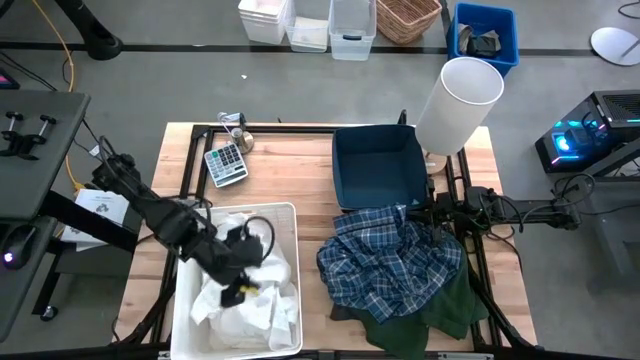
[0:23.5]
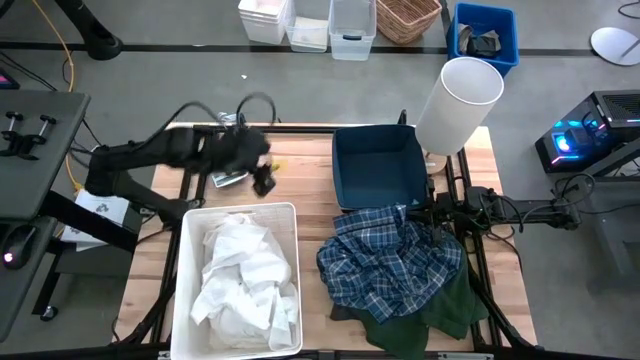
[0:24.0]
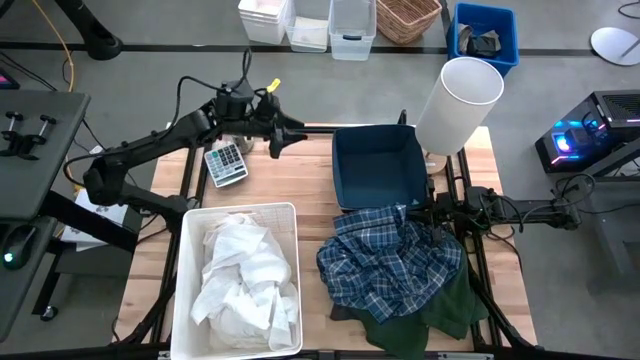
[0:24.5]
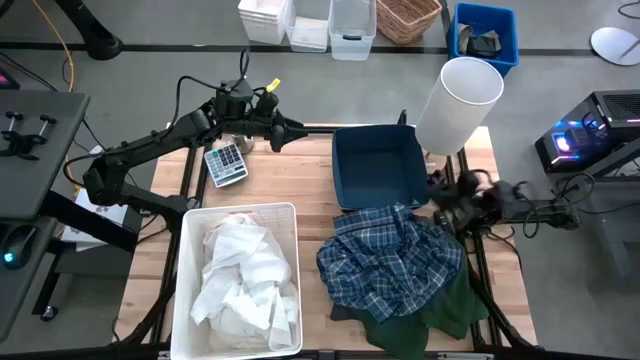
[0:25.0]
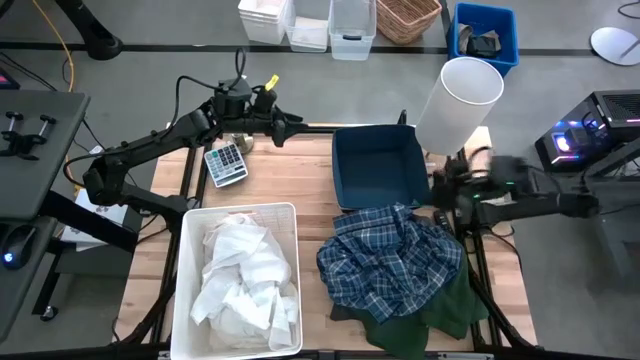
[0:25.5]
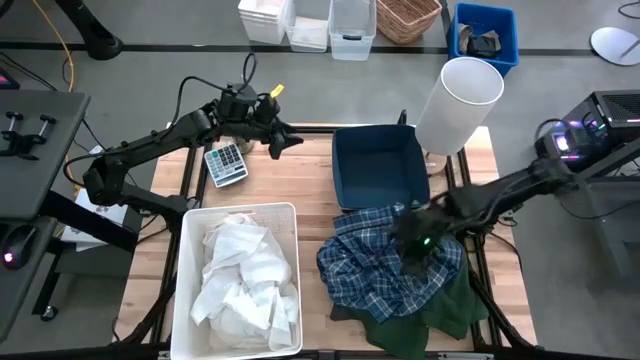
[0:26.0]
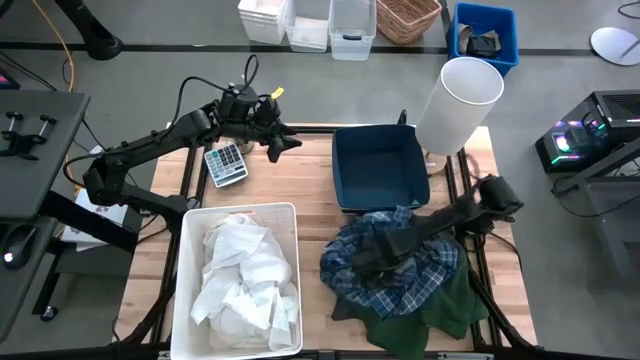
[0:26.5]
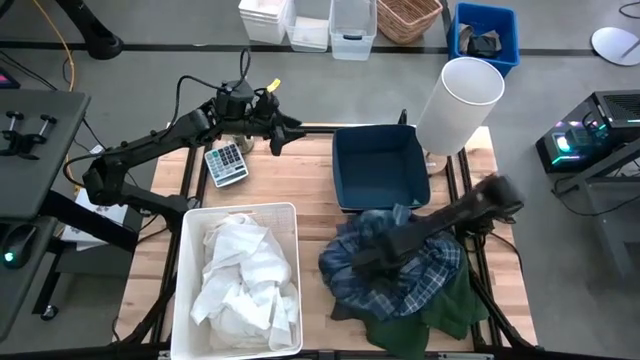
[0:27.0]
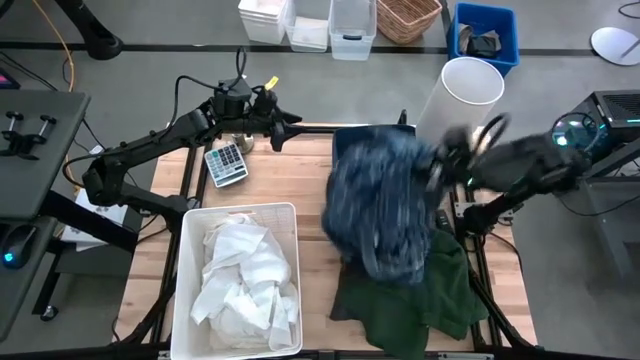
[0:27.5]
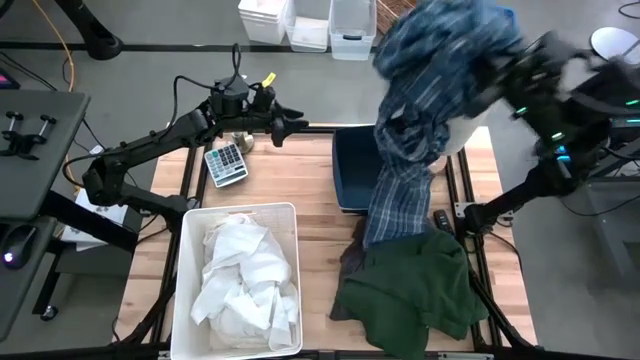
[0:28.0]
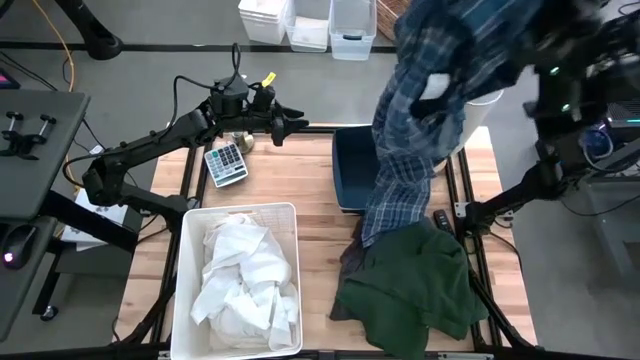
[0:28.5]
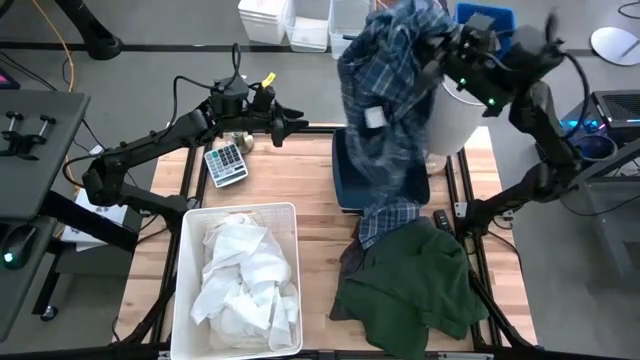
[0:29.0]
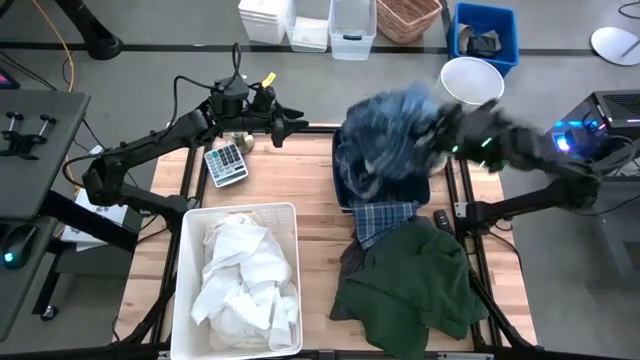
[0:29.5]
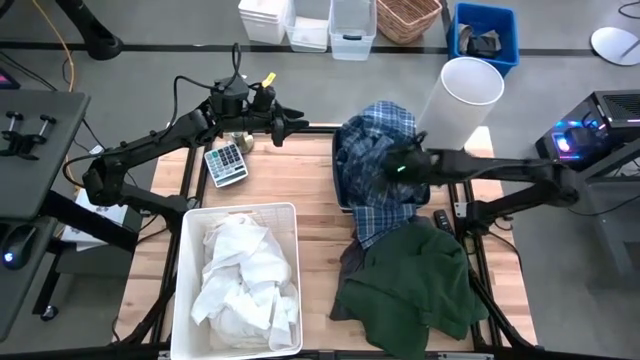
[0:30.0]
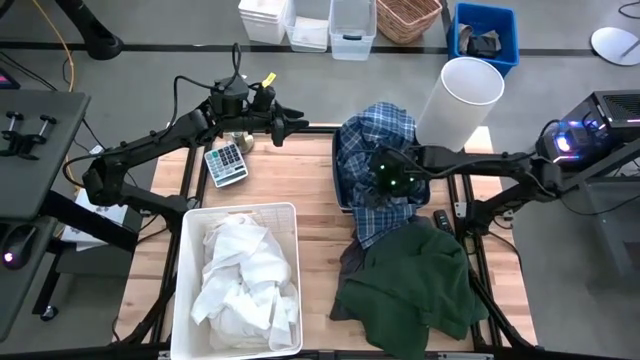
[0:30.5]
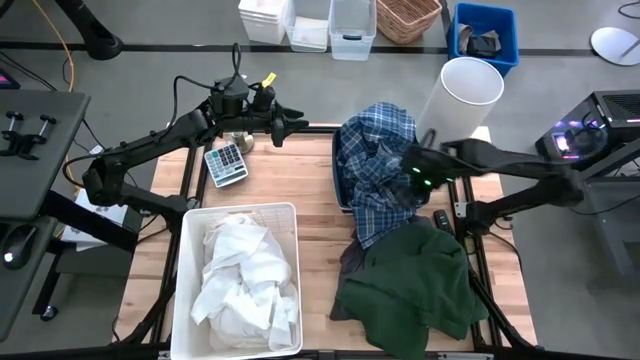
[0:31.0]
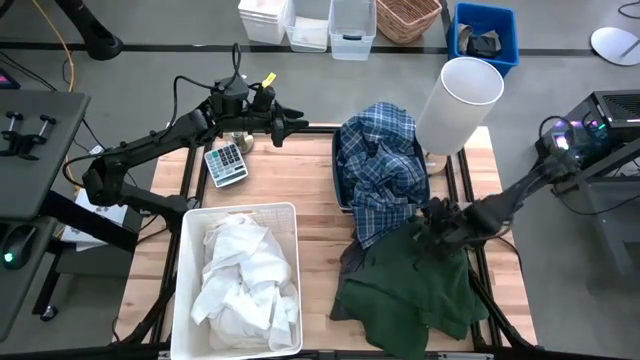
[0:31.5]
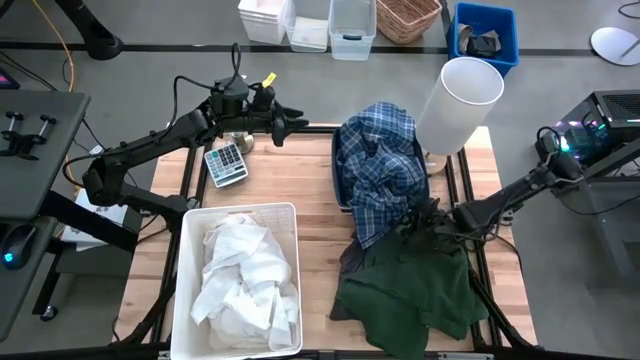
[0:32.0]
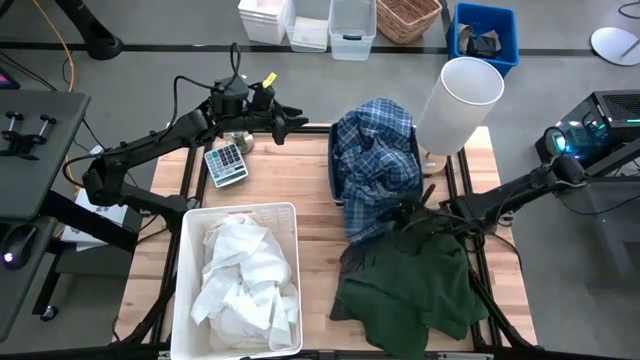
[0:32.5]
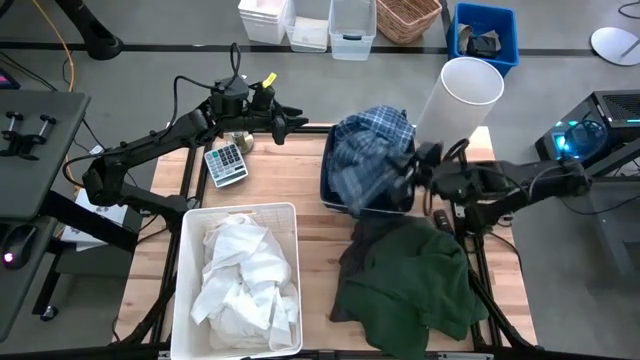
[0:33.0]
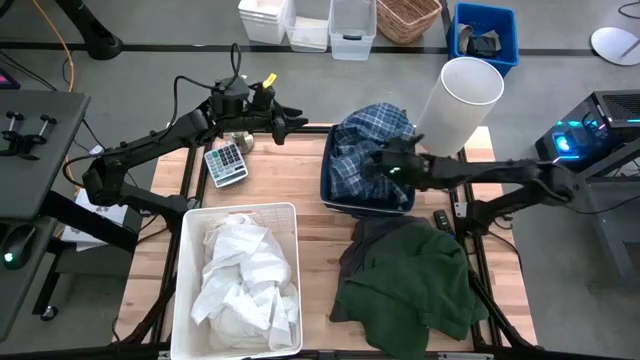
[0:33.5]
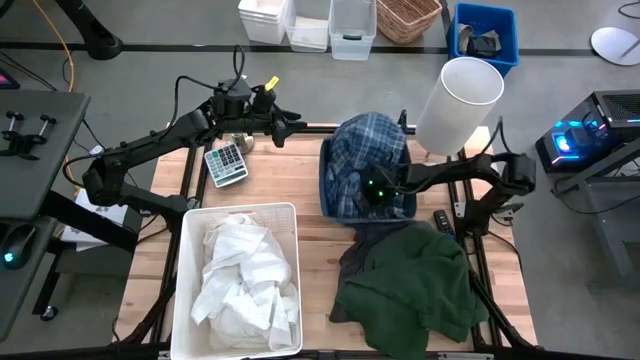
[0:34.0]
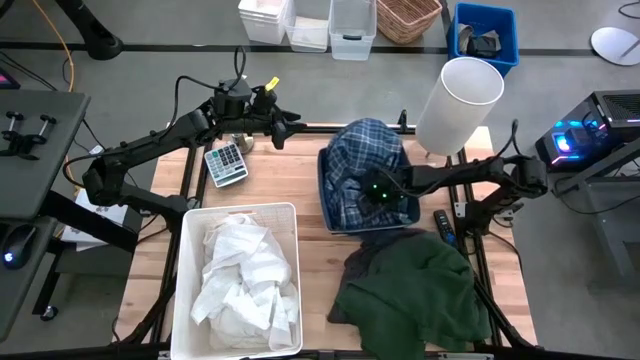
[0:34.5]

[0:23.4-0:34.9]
Task: Sort clothes
Put the blue pants into the blue bin

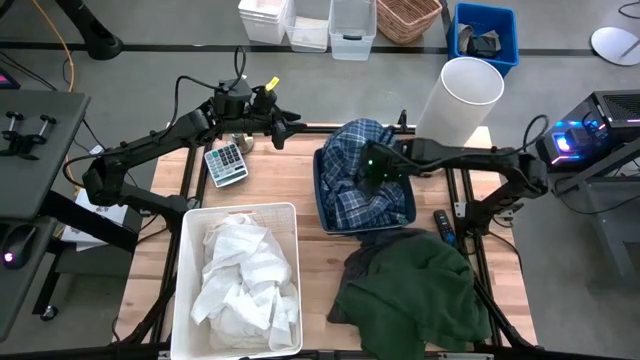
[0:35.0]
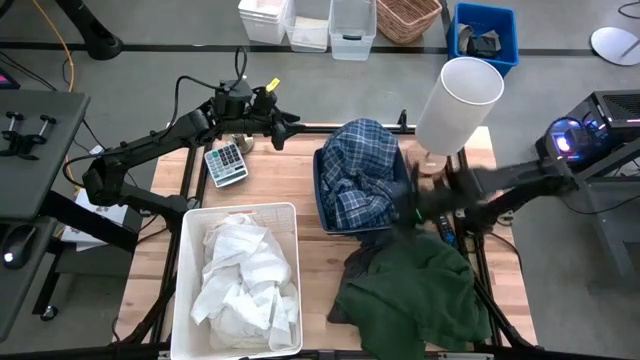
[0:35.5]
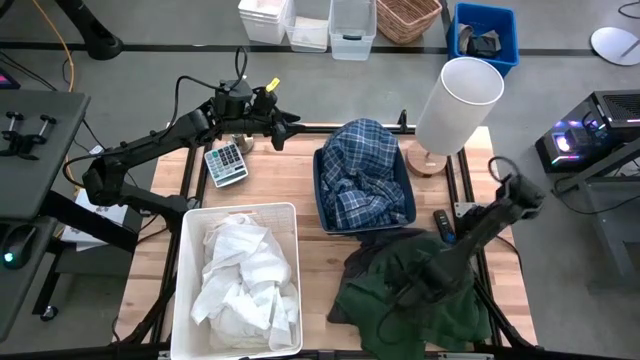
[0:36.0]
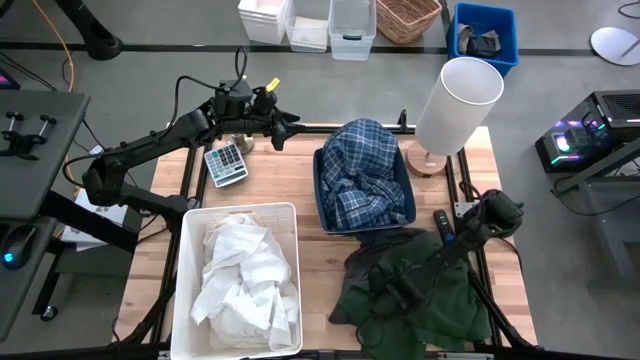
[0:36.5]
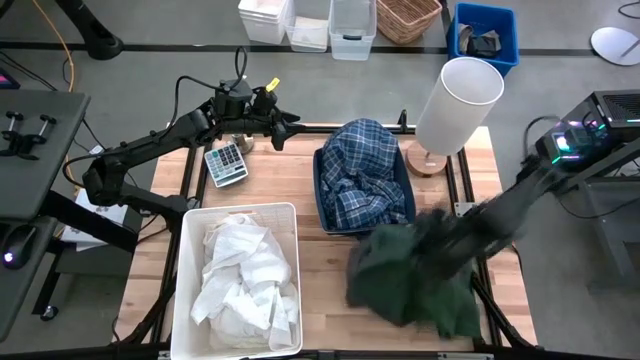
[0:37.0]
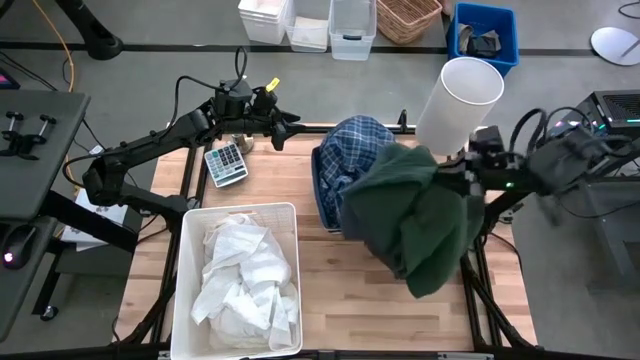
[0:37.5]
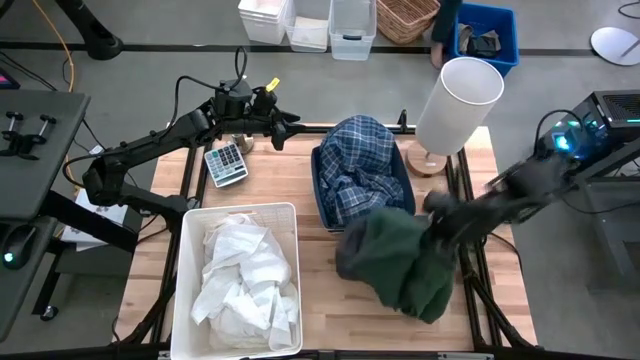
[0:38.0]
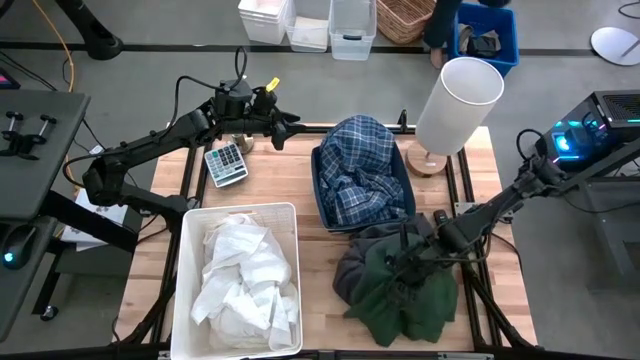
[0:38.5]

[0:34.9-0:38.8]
Put the green shirt into the blue bin

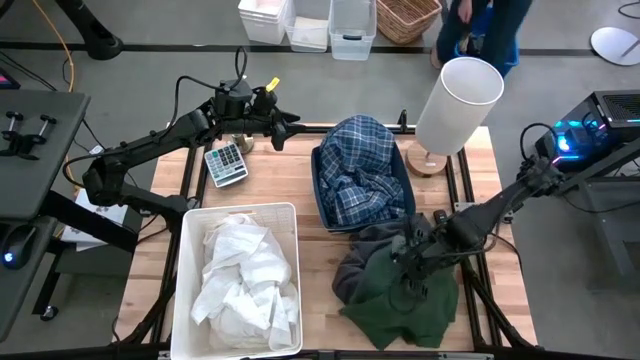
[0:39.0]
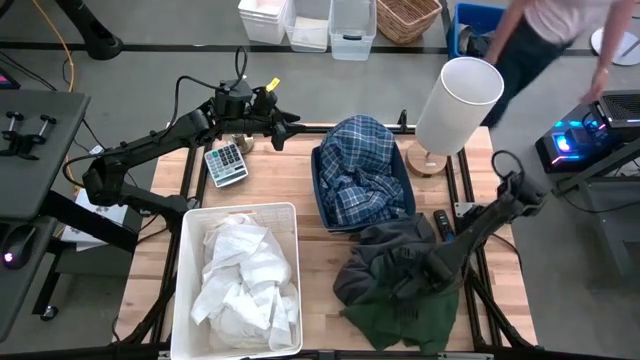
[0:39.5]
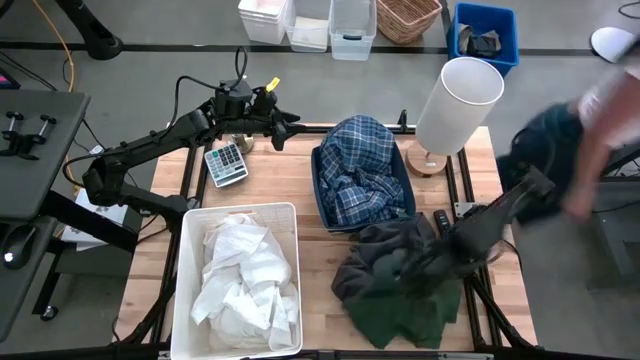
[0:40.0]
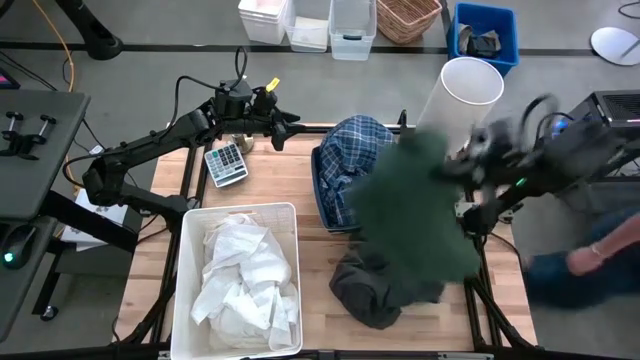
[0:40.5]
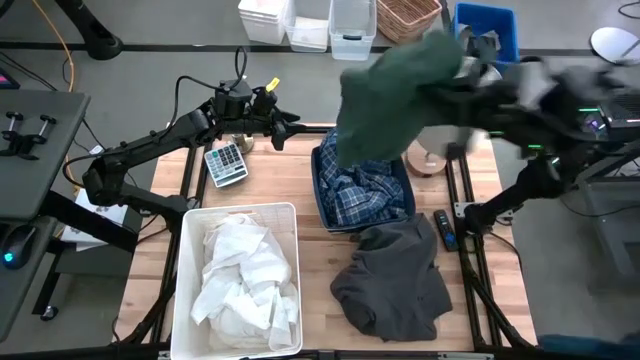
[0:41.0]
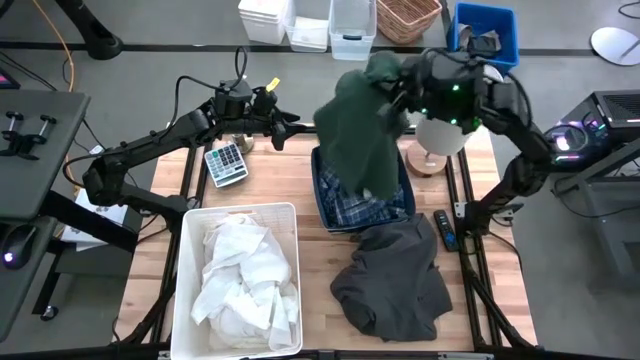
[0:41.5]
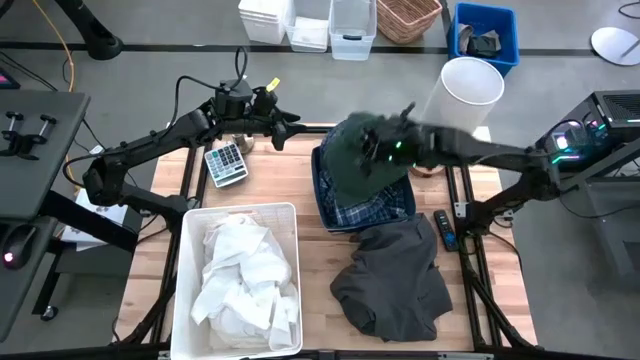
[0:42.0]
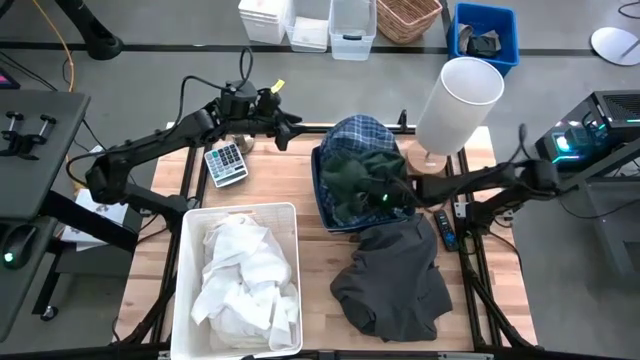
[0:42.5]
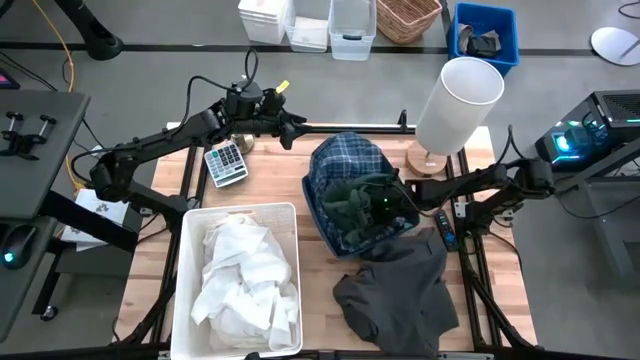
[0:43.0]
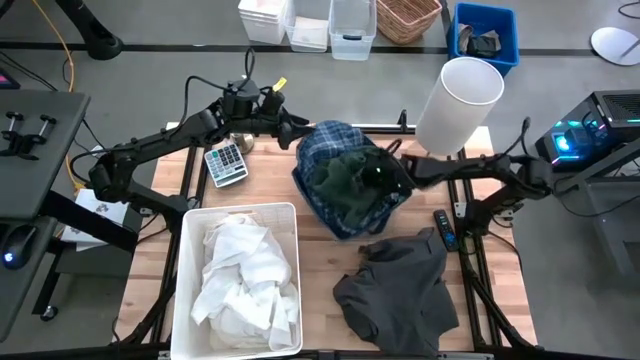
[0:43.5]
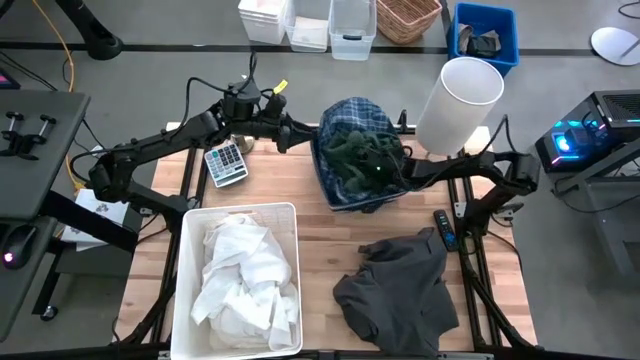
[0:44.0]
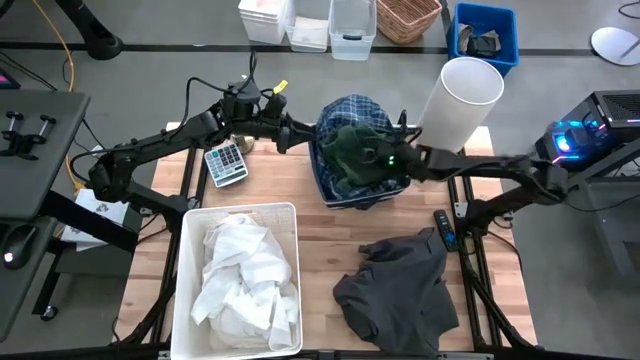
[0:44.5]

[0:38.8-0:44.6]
Put the green shirt into the blue bin
